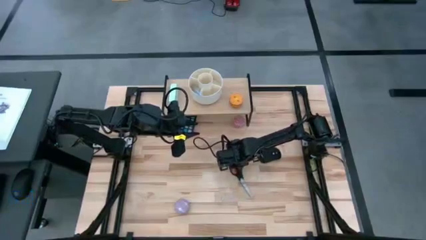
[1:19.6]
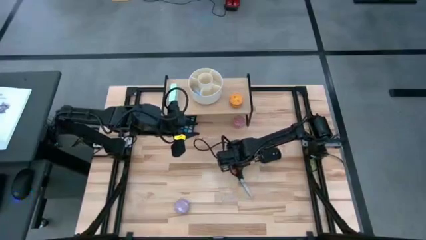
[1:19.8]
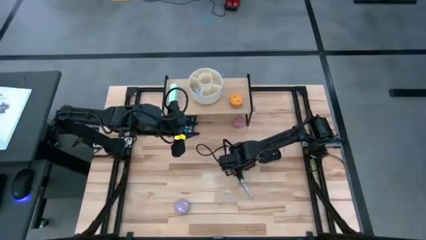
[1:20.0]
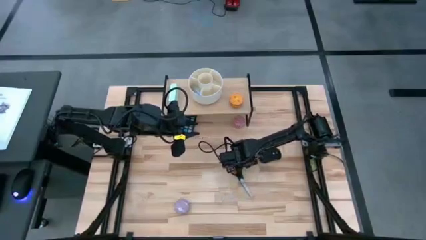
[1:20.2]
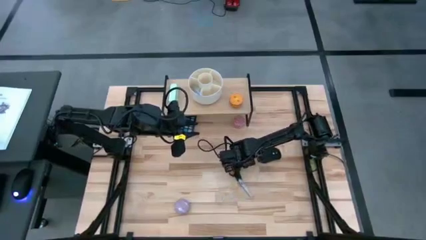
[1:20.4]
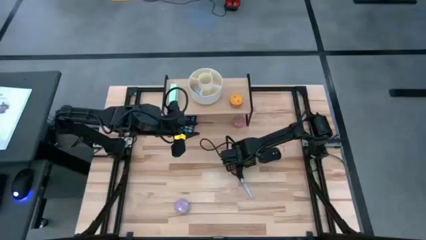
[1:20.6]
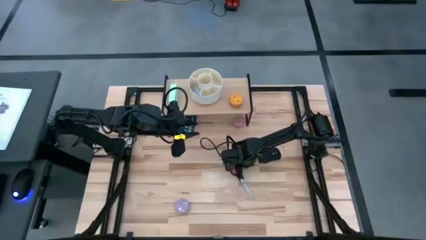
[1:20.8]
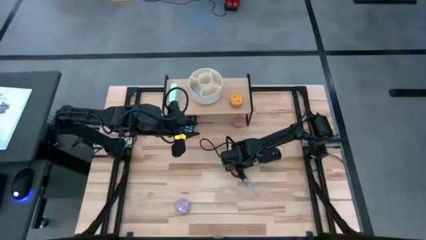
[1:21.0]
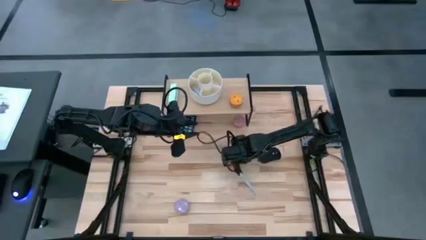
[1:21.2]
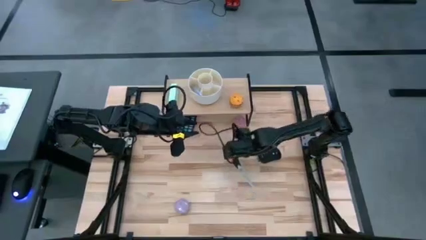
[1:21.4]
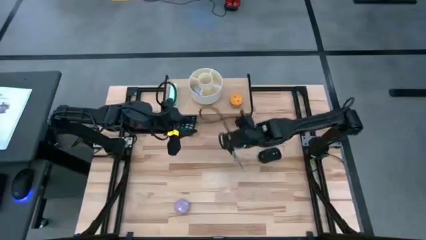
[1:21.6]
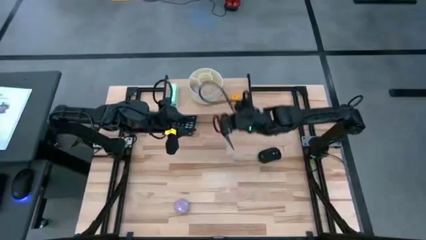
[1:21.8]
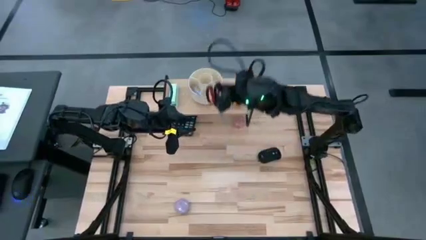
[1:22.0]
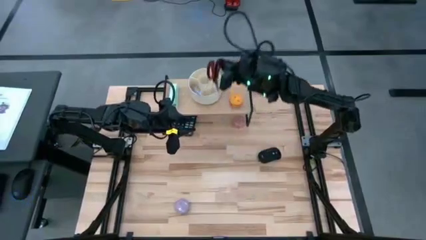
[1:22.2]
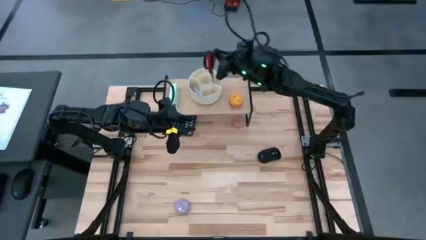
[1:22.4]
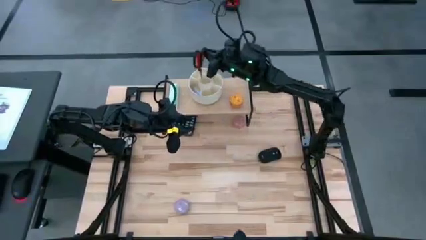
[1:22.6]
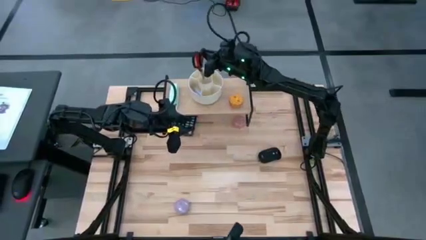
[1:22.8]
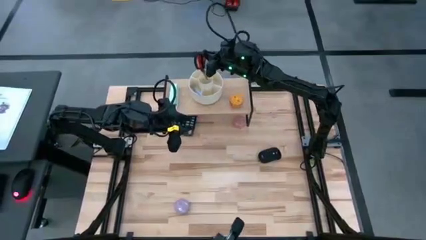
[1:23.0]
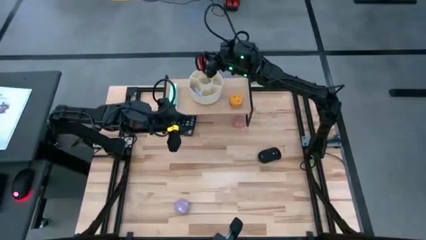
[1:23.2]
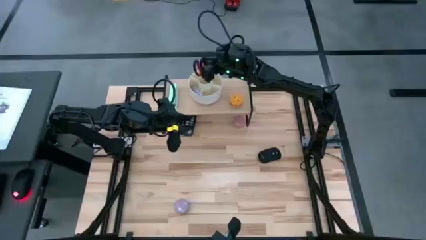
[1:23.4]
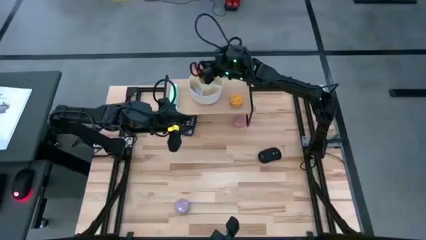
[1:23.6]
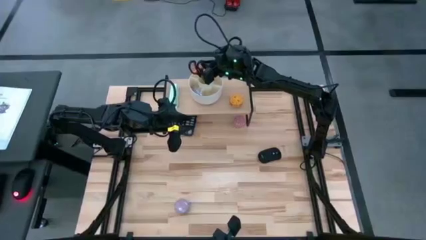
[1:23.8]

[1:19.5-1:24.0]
Task: Stock shelves
Put the black scissor into the white desk organizer

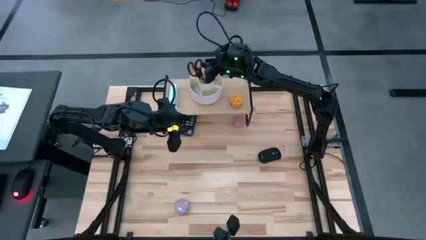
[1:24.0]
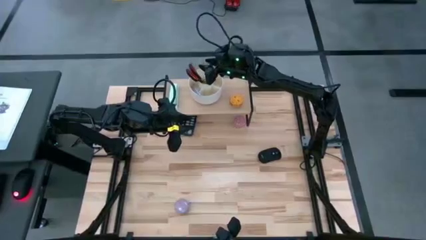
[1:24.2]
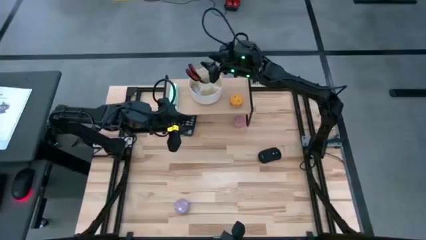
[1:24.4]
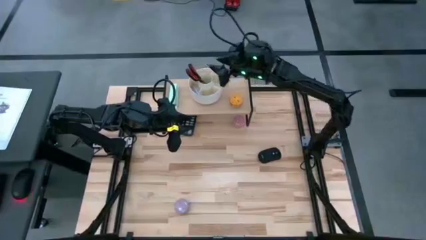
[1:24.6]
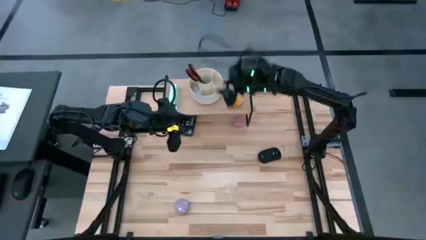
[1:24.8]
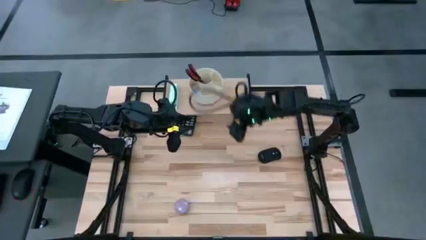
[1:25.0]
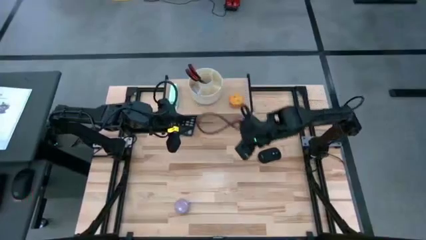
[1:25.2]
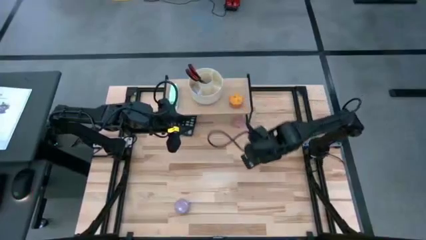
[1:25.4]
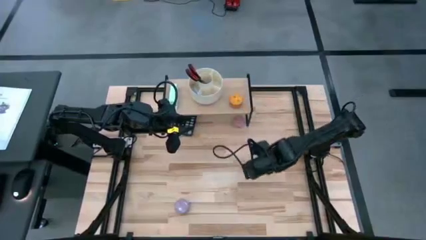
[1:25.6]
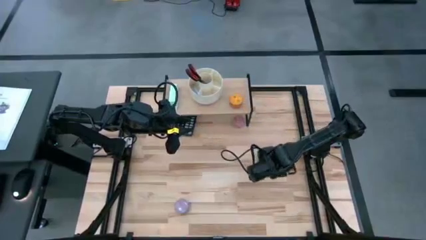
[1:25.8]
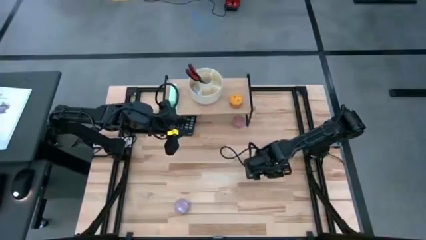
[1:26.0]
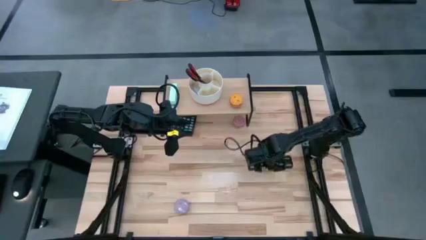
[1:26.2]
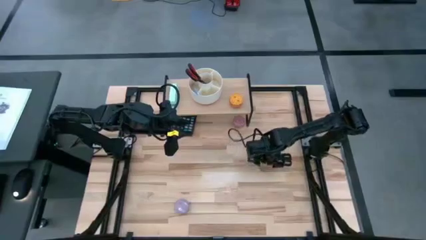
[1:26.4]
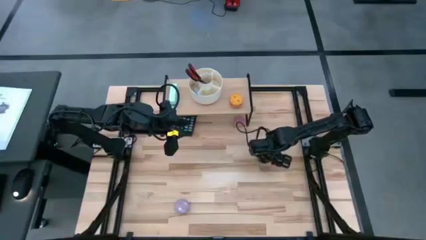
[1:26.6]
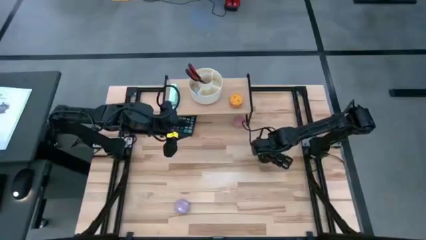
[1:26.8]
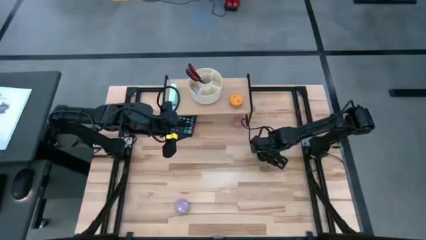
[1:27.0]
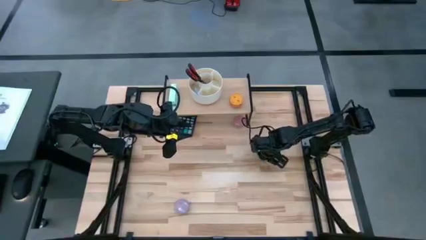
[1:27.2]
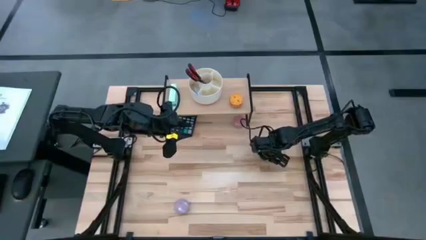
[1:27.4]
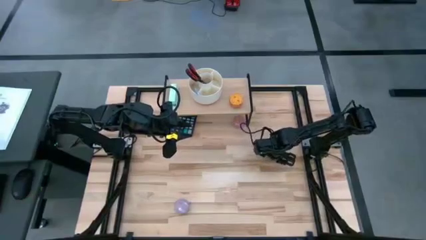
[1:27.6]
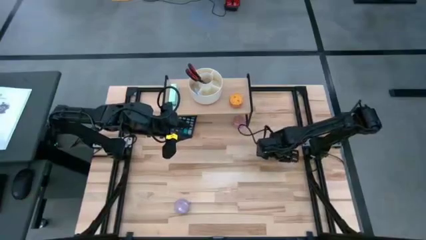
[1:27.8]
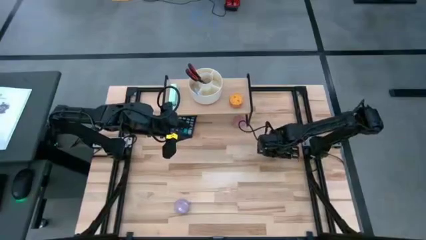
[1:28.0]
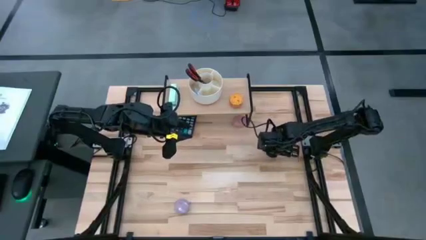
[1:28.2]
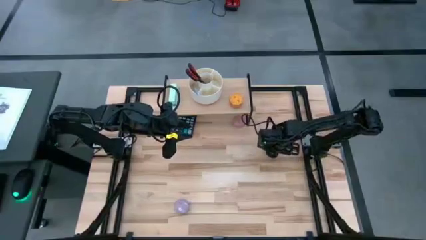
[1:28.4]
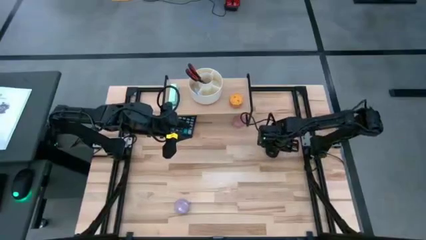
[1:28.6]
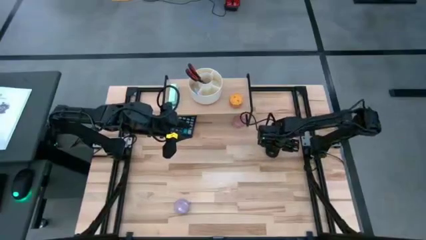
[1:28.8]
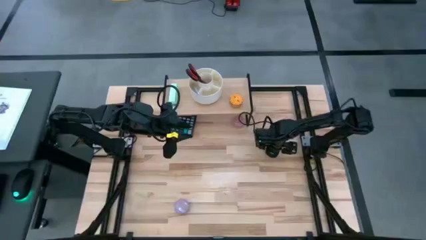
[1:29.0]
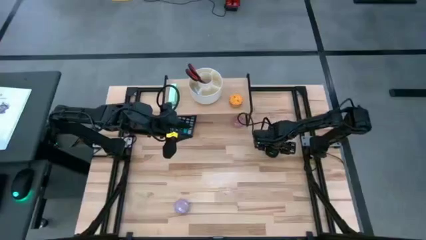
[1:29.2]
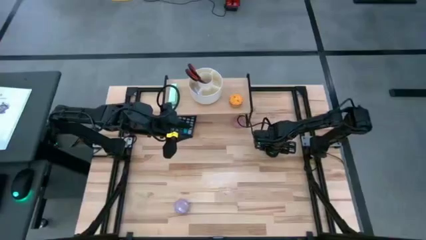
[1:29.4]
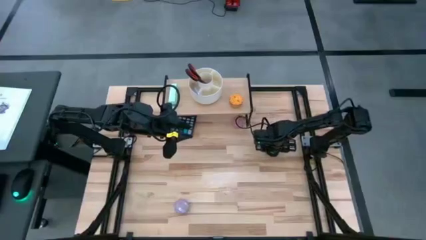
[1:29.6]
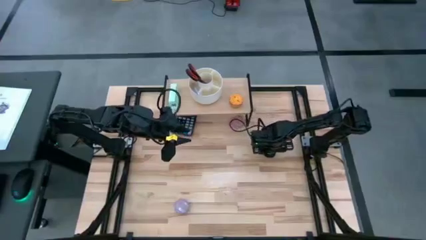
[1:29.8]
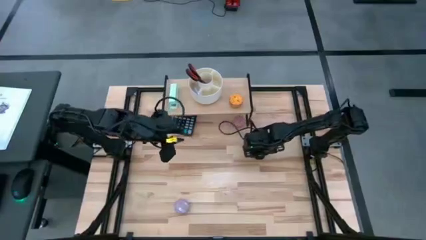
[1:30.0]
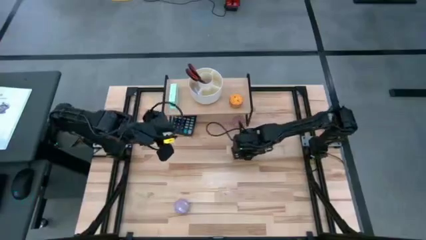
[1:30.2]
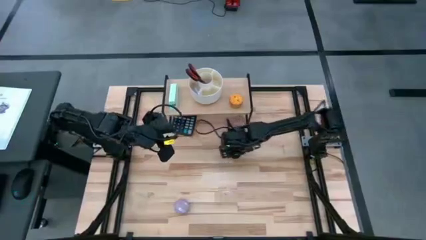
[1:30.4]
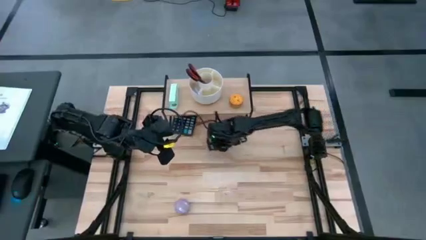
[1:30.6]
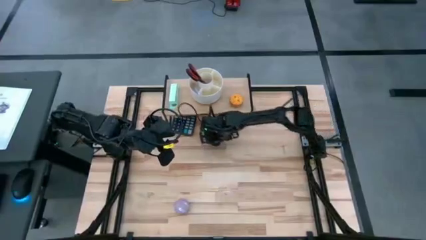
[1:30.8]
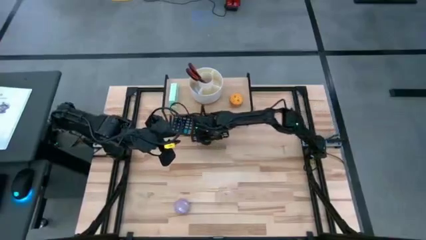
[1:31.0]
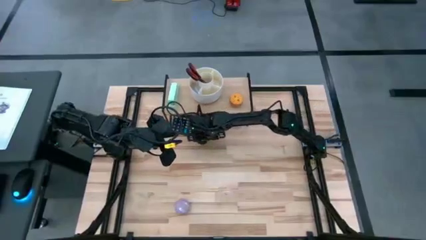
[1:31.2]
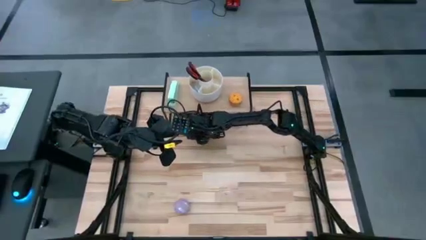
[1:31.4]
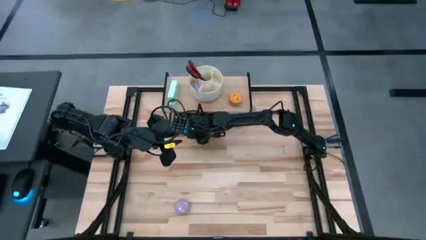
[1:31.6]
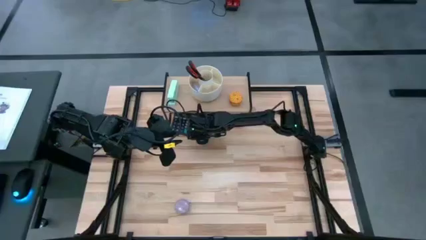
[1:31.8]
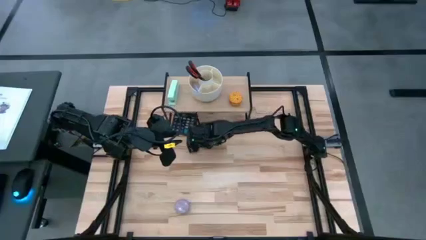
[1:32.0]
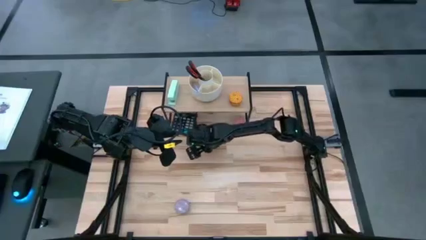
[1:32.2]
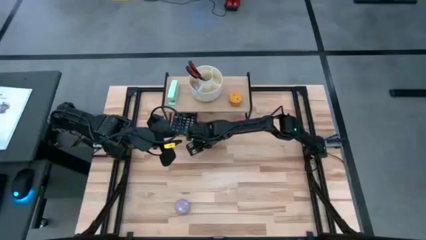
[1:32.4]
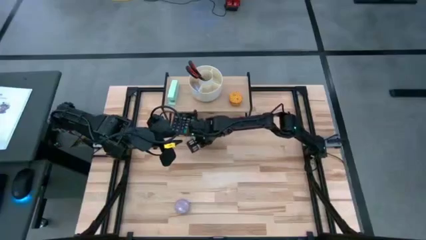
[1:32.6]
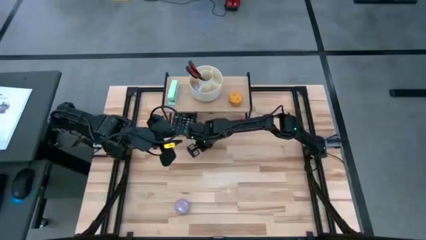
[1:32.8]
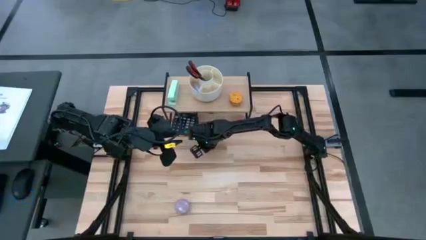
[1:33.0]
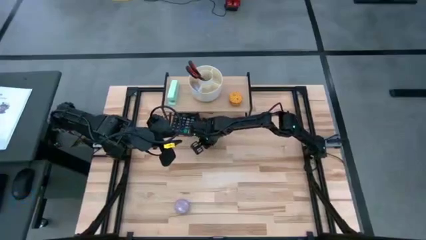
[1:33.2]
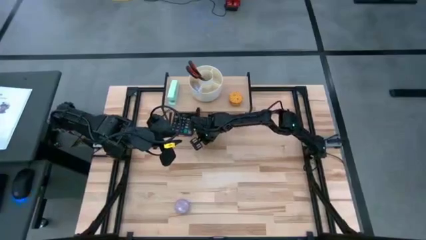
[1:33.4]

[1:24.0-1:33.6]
Put the black mouse under the shelf
